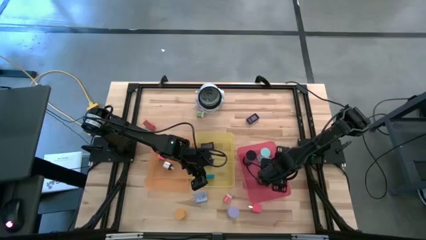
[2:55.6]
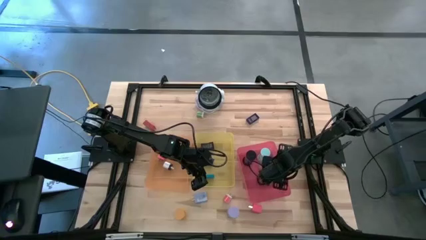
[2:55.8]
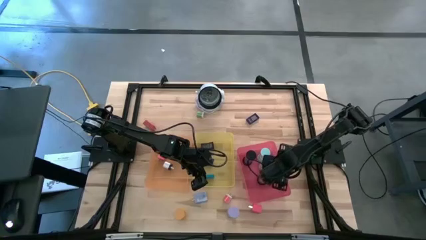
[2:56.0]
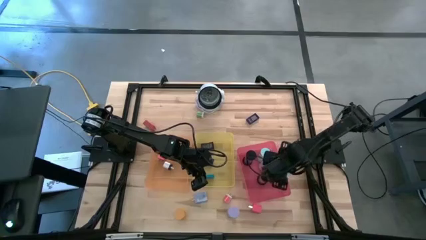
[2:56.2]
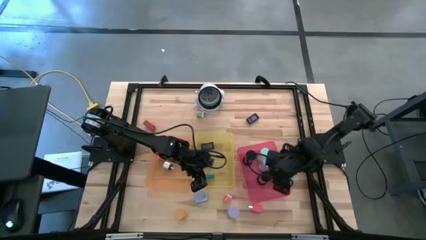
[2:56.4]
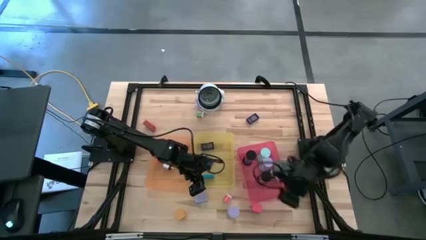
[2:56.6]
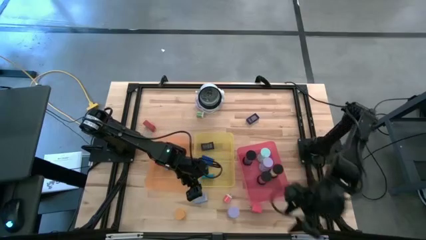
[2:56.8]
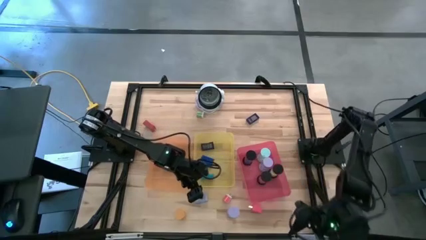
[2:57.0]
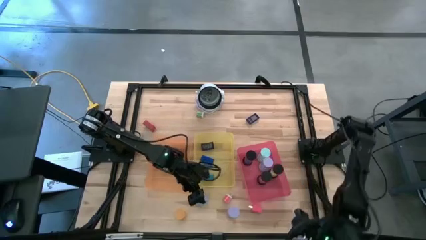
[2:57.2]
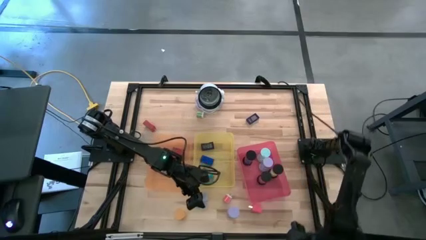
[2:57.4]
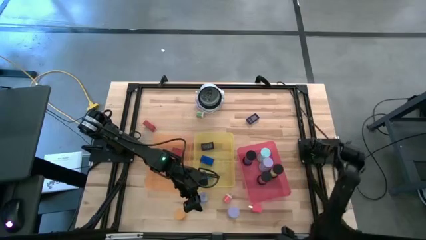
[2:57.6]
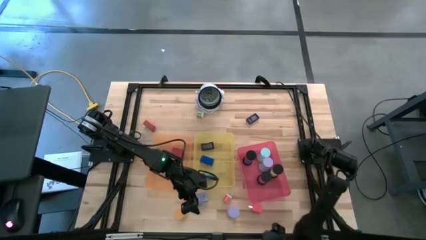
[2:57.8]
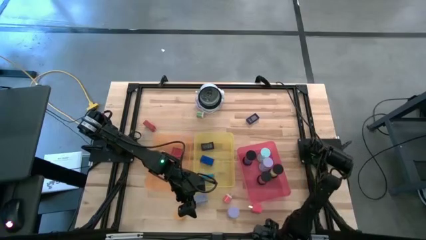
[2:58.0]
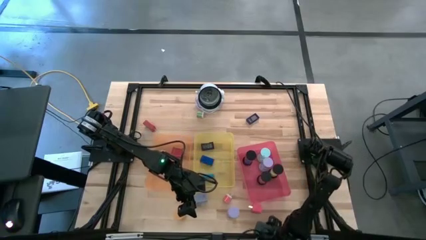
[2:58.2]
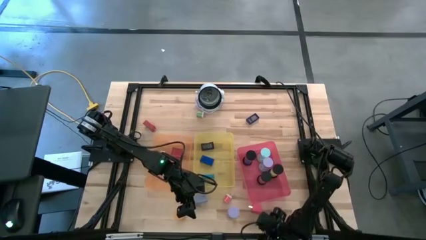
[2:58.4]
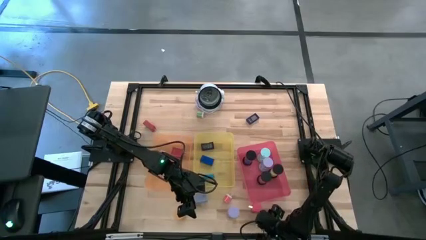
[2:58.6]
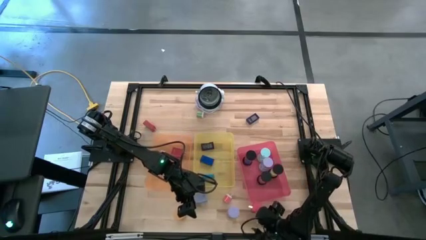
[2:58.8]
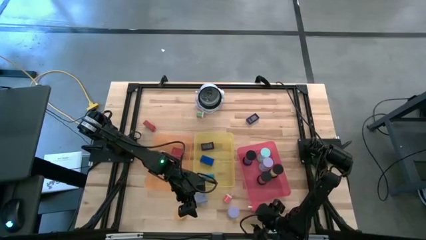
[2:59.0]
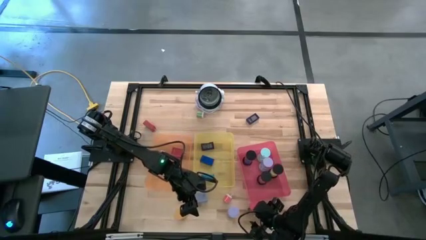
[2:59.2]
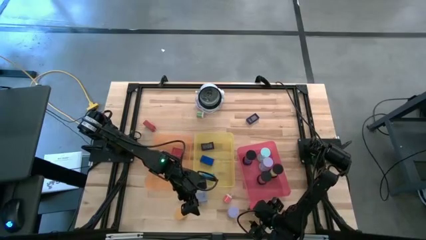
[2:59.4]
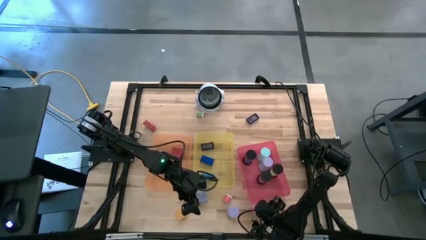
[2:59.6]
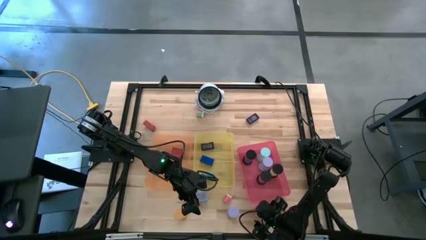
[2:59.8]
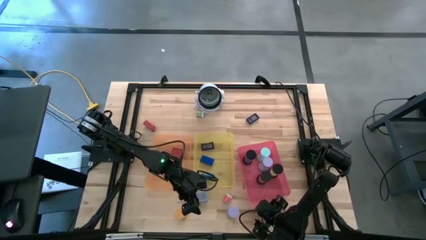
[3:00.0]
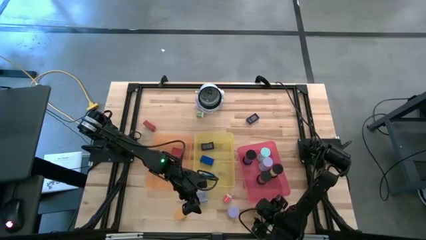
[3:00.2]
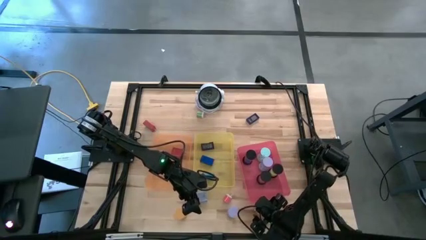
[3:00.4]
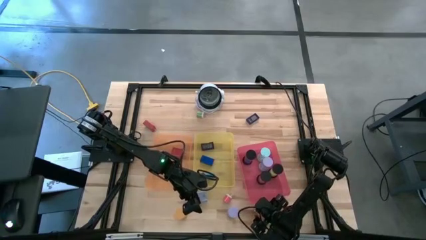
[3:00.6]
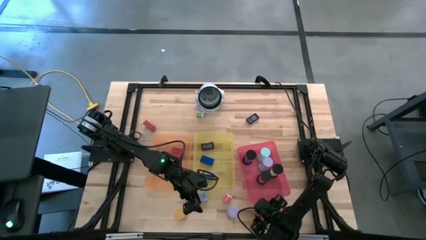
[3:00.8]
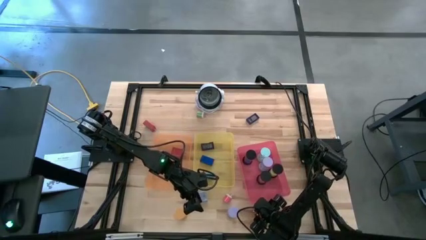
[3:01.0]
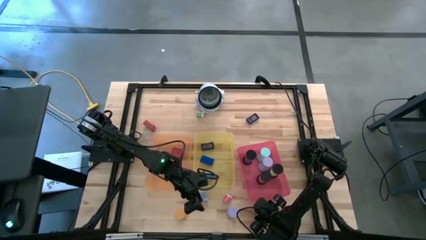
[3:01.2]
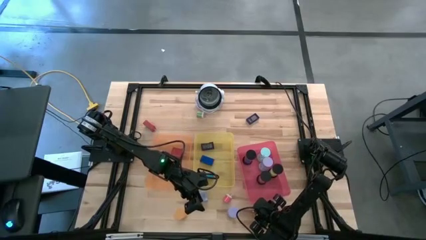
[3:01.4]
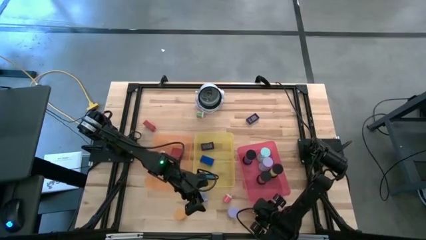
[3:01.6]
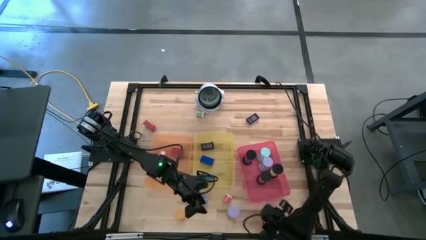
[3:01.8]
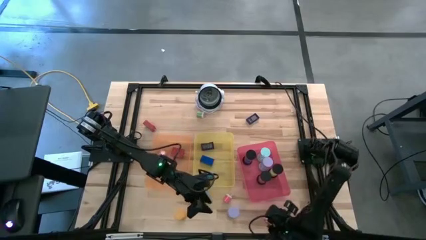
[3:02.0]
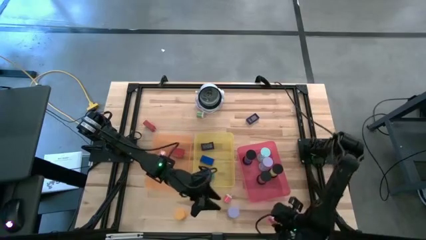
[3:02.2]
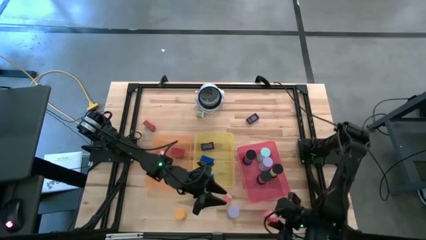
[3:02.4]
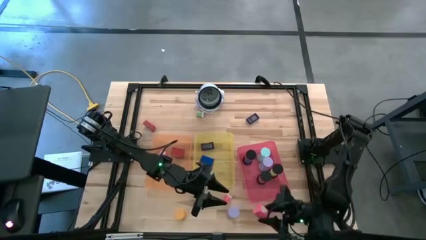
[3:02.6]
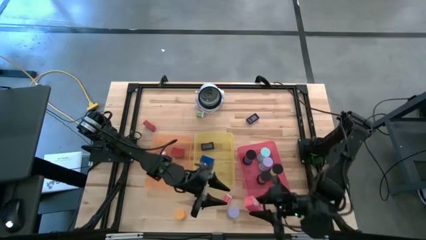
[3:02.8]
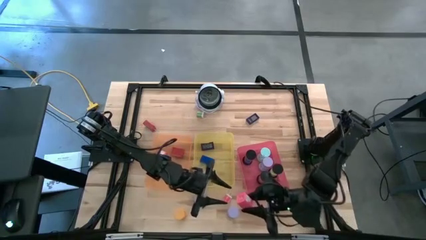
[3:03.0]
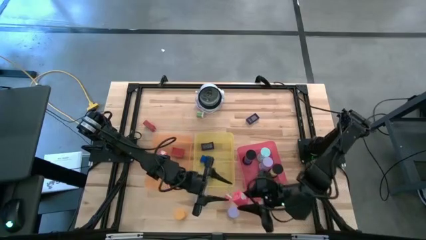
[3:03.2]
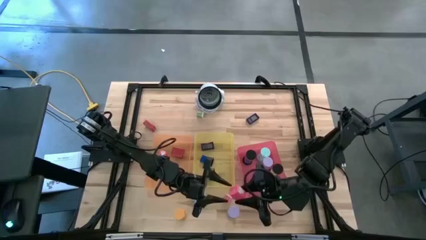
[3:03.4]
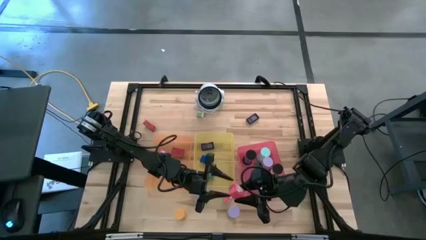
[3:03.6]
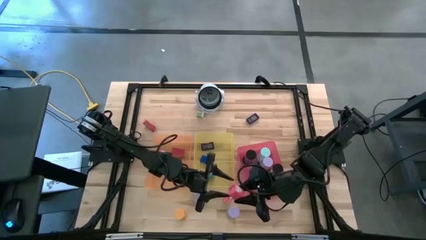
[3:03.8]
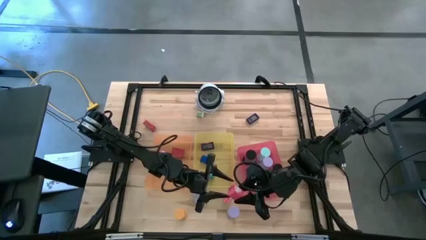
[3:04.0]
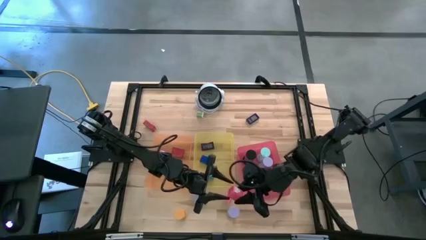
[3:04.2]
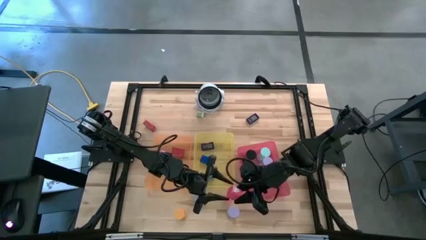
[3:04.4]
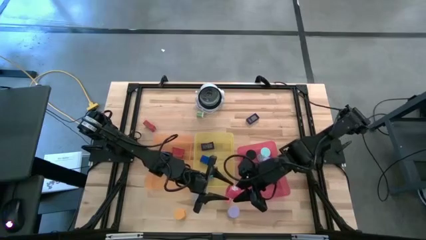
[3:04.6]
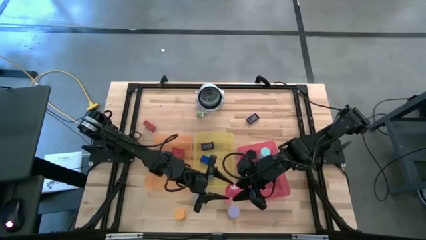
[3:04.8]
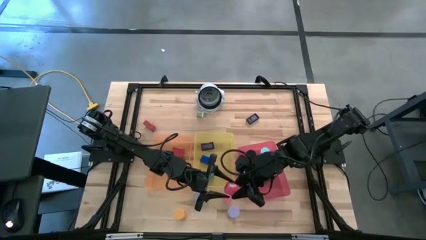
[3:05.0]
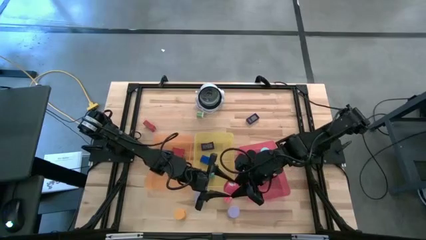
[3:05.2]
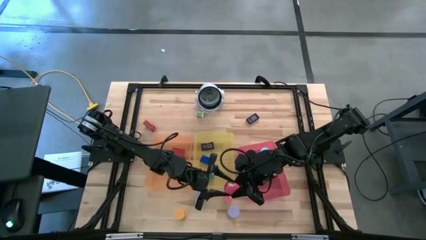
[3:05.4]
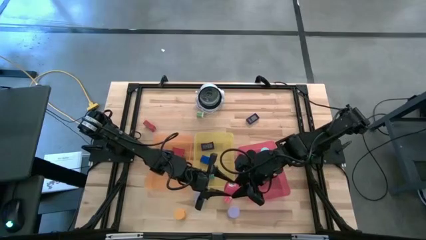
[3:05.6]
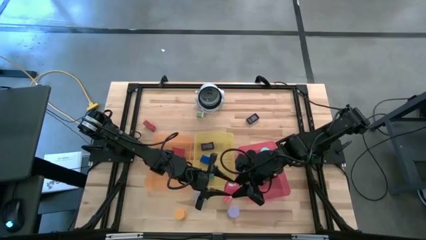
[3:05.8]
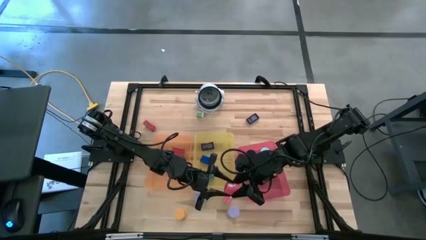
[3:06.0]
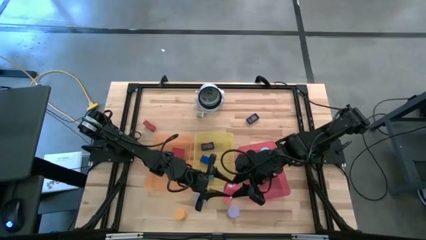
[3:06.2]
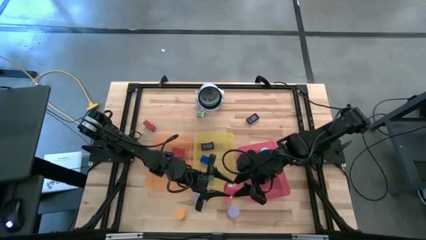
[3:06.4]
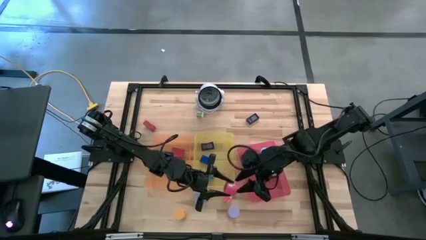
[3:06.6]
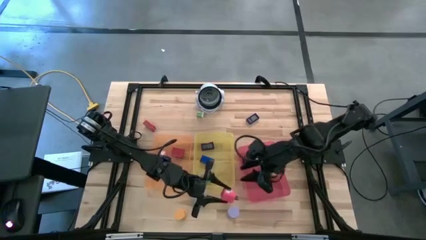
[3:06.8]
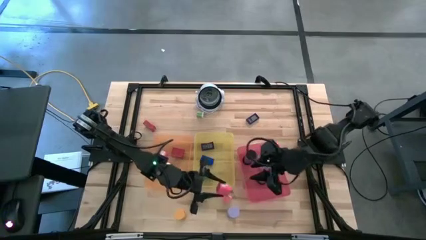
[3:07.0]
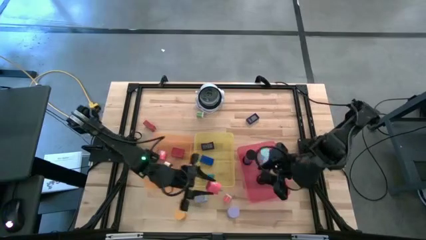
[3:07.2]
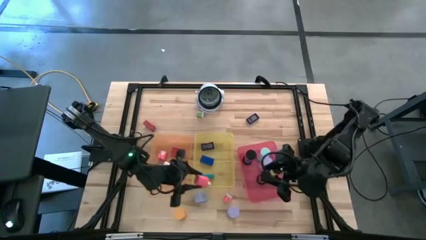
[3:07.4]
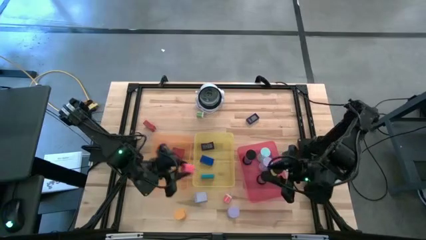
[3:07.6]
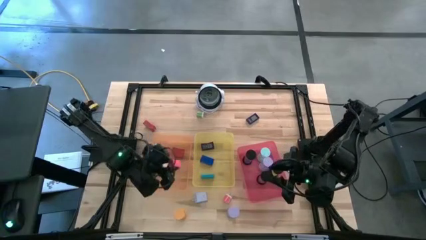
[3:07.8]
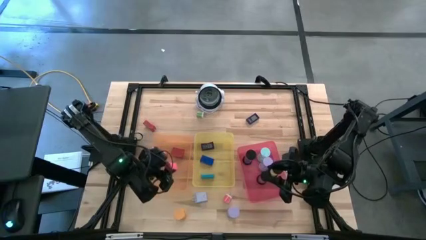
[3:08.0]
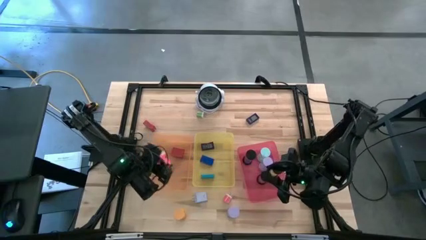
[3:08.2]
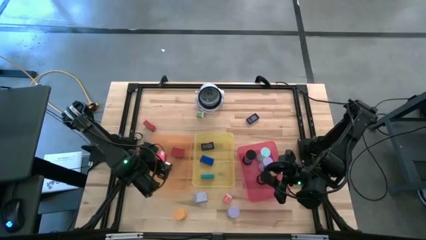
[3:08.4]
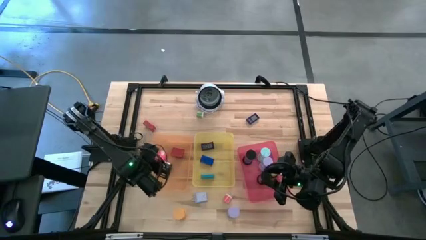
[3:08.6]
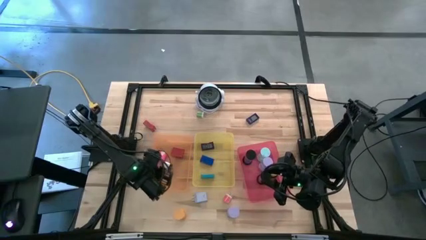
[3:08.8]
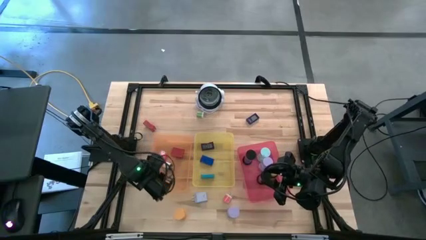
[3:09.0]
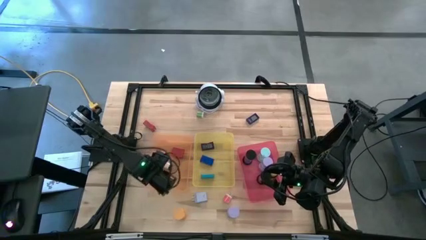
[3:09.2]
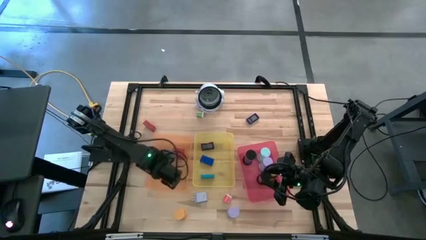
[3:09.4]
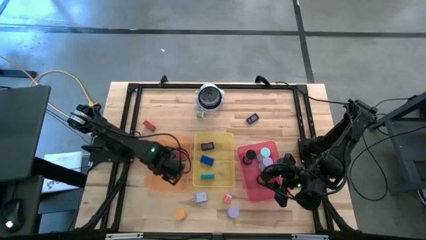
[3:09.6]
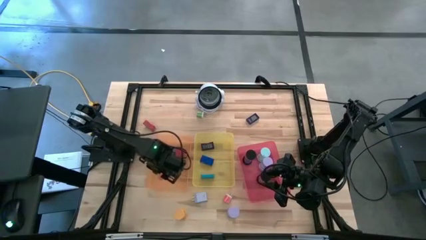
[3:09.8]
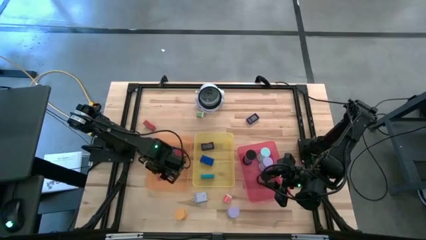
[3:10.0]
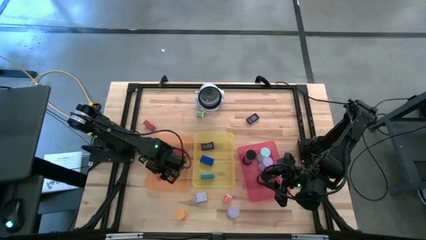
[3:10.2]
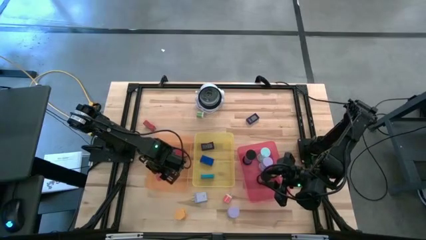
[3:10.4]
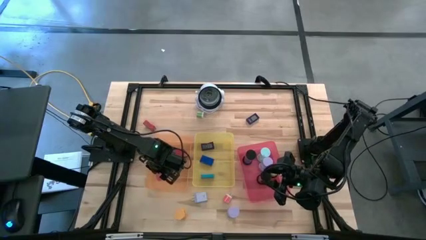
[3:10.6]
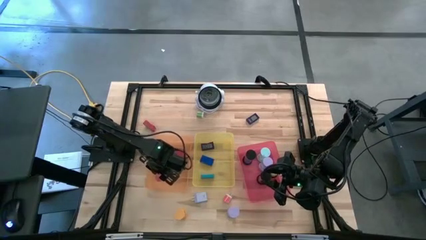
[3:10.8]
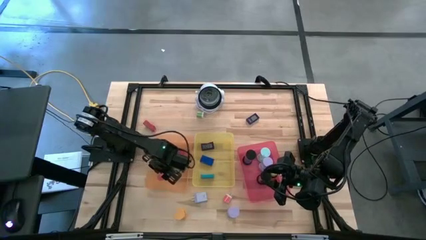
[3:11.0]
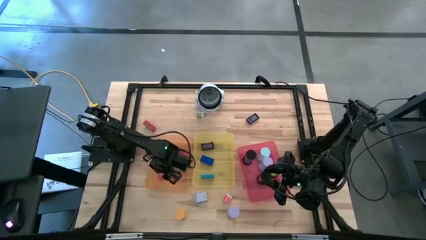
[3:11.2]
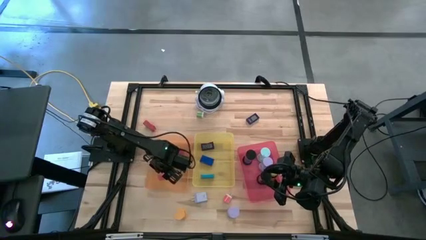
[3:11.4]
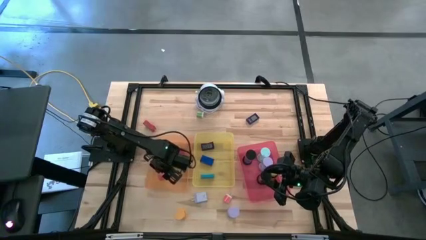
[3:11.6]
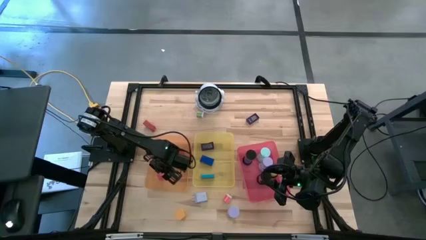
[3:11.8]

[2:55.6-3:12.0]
Task: Pick & Place Office items
Put the pink charger adaptor into the orange bin
